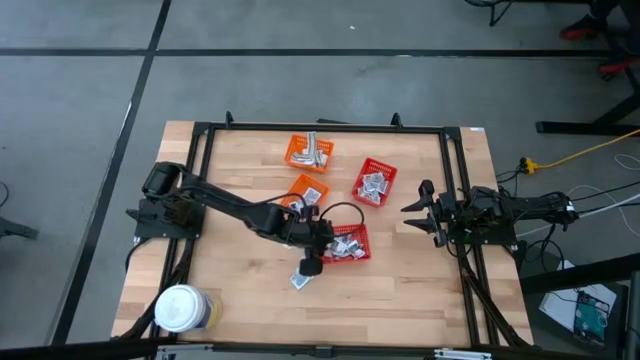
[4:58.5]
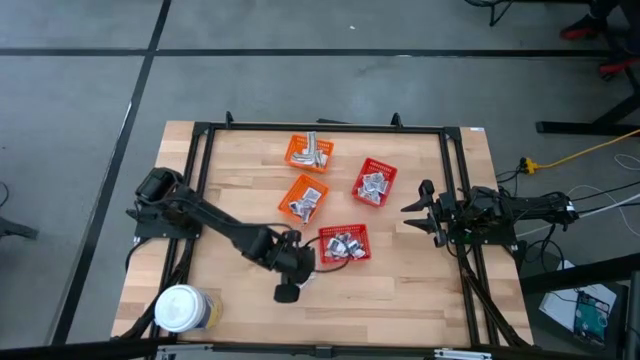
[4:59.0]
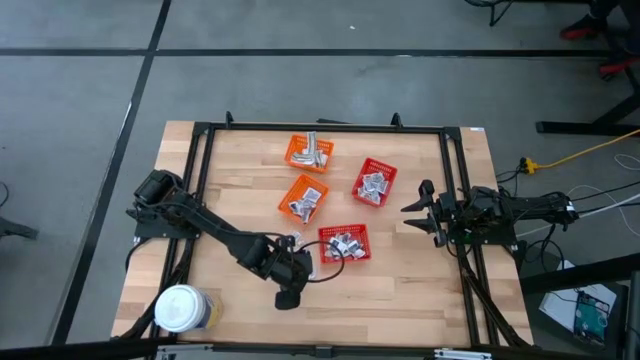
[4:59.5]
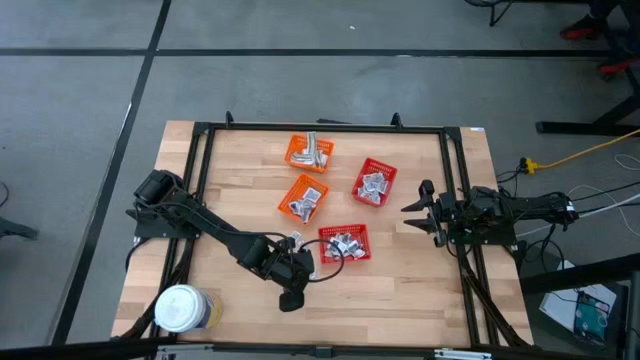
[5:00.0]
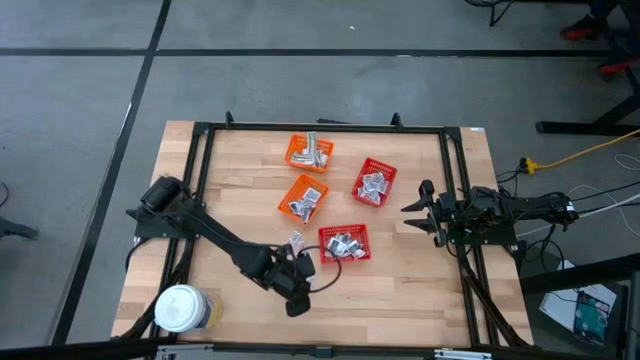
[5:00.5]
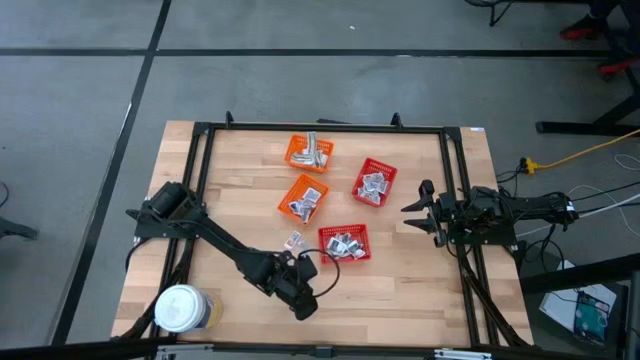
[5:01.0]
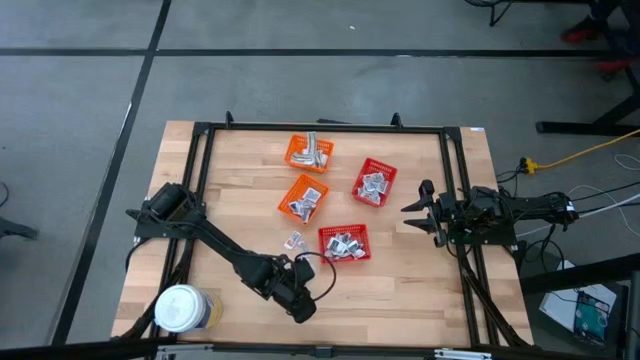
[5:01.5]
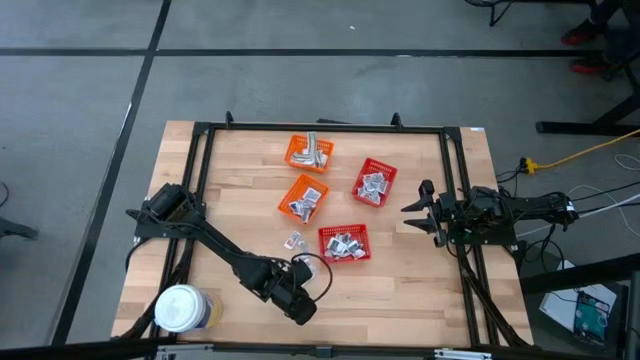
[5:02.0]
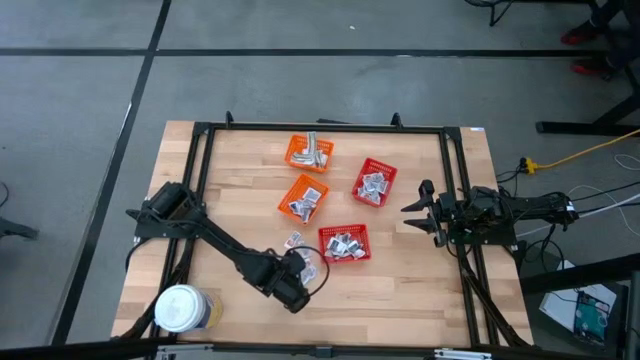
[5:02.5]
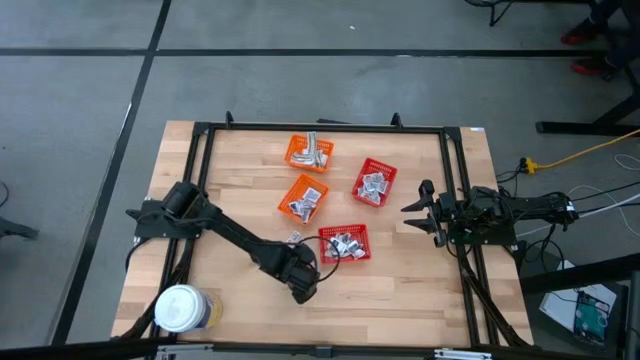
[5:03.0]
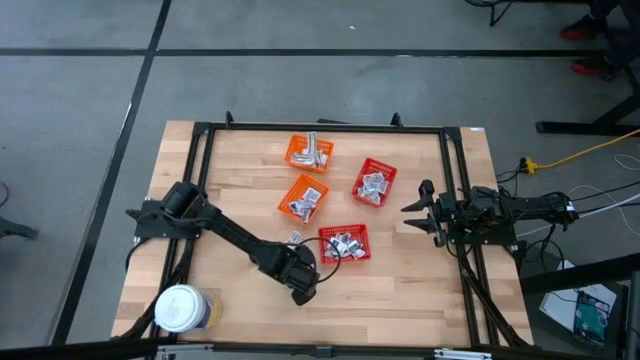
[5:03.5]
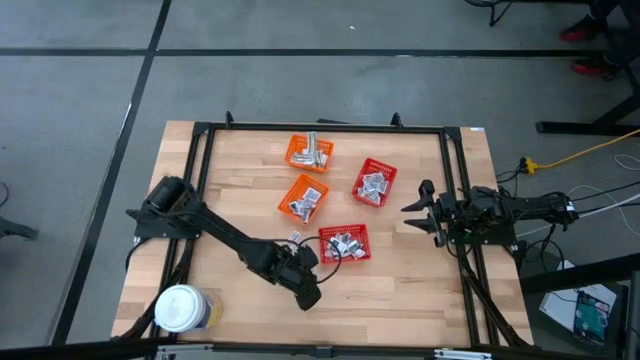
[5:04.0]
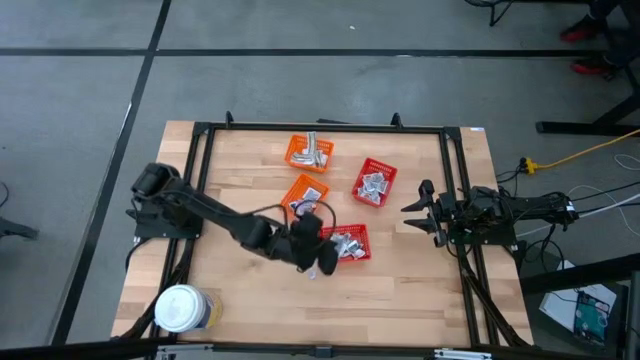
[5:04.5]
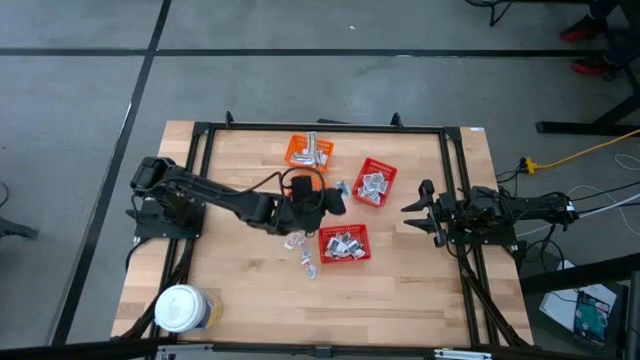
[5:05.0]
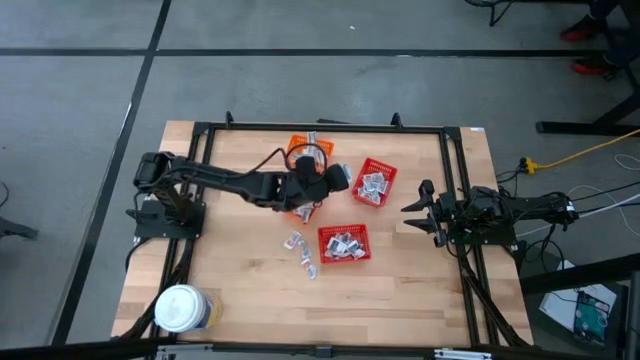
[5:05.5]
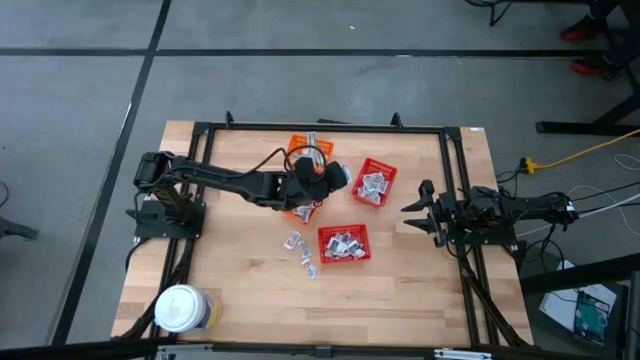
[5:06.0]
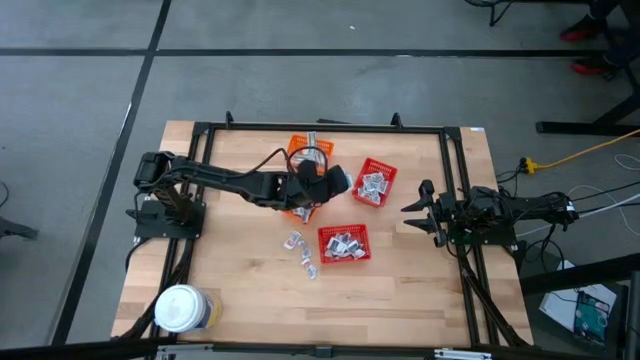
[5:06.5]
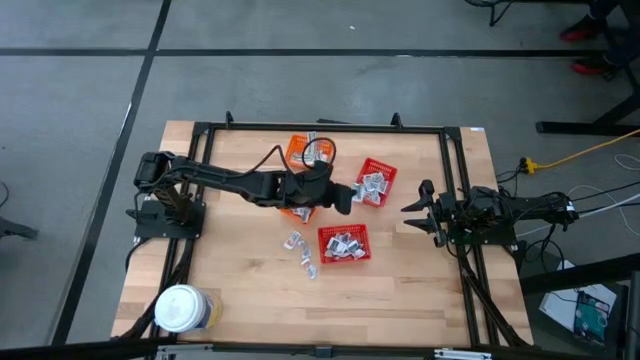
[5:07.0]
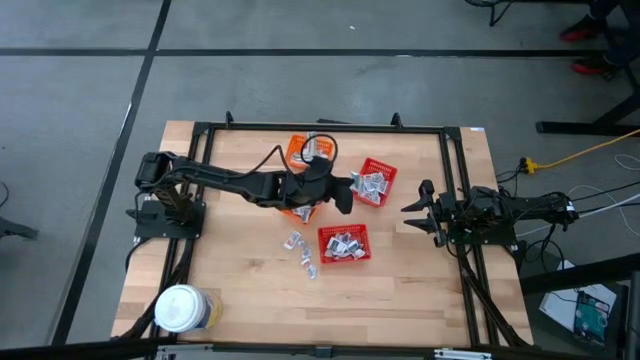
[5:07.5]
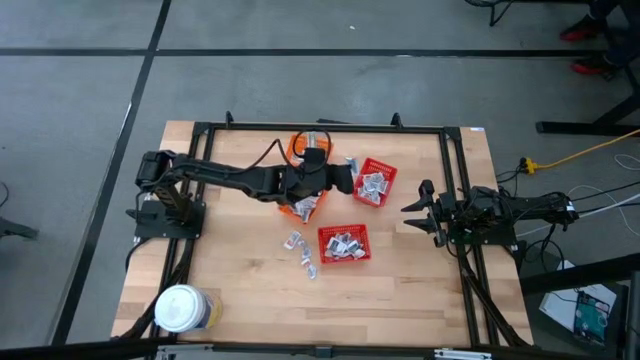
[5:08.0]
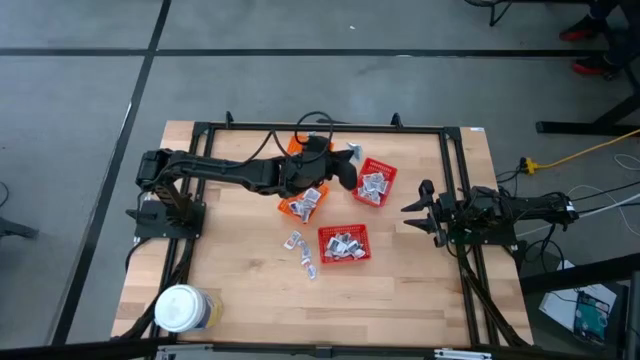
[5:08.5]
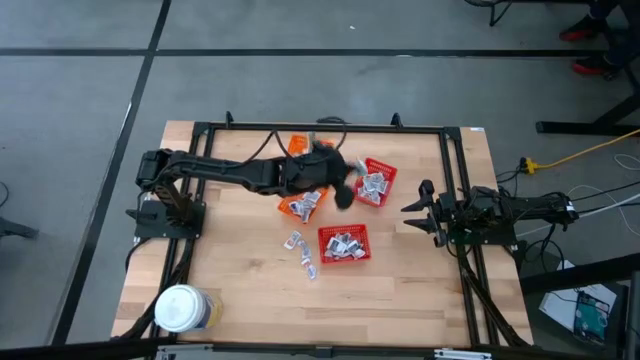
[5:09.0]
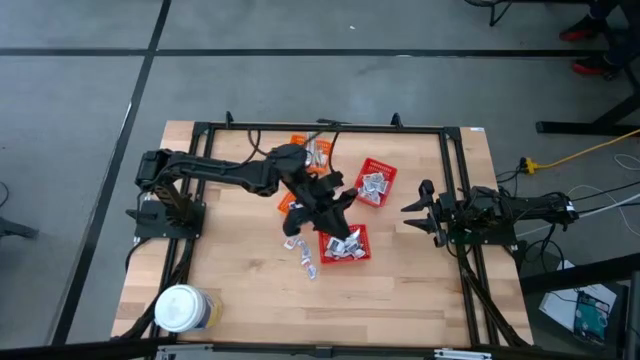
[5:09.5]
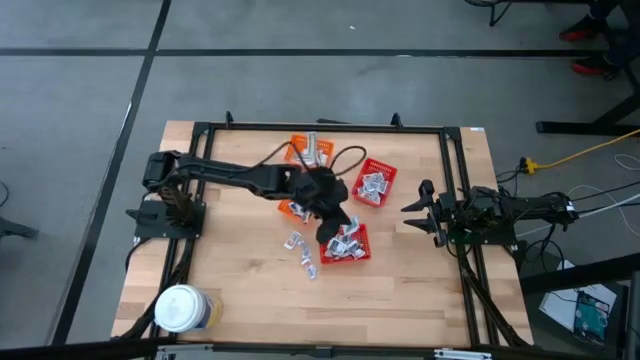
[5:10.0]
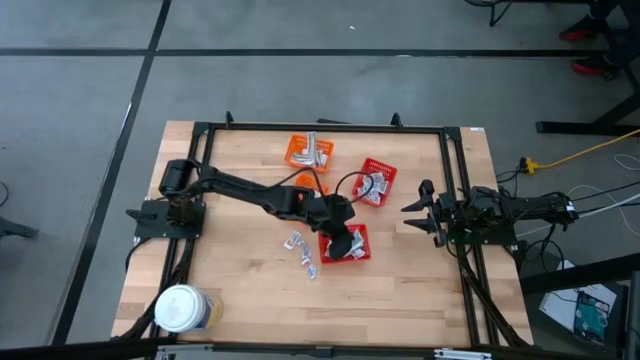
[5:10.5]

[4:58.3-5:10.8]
Task: Pick & Place First Aid Supplies
Put the gray towelette pack into the bottom red bin

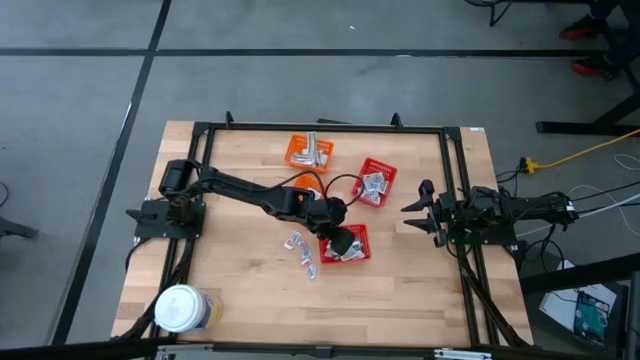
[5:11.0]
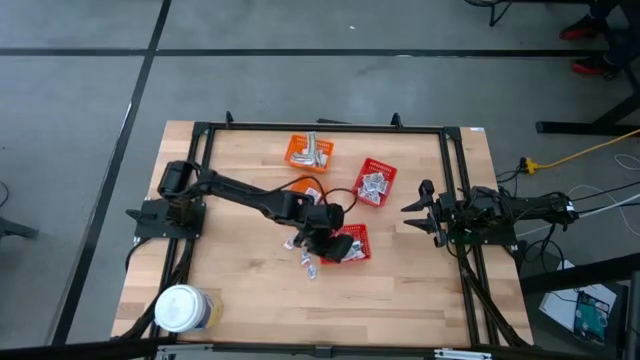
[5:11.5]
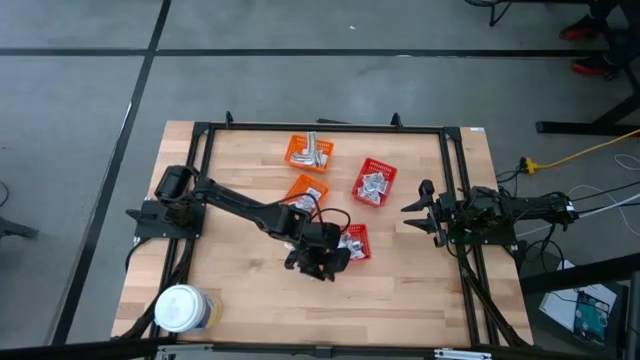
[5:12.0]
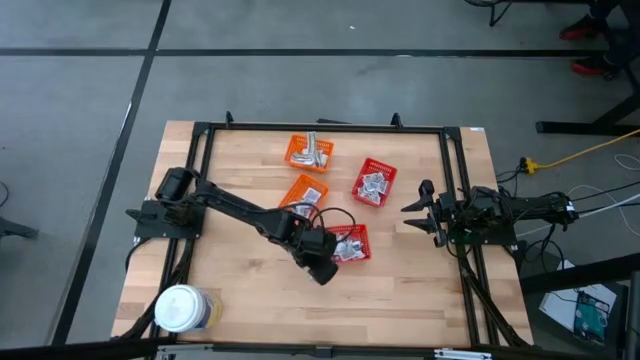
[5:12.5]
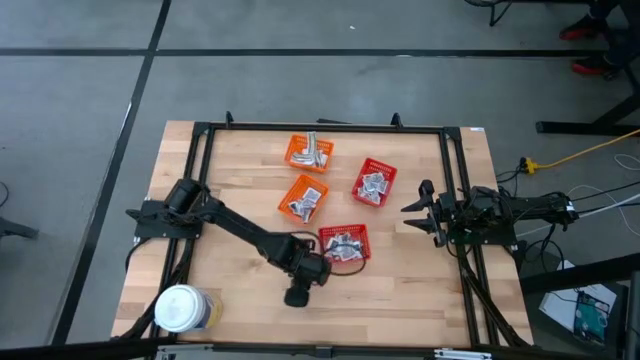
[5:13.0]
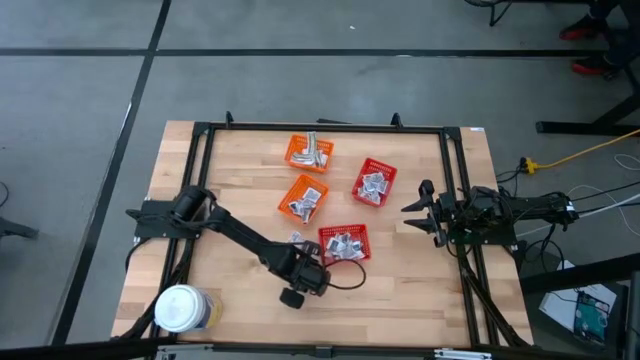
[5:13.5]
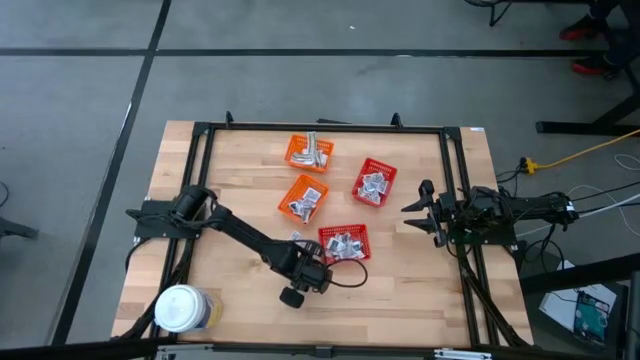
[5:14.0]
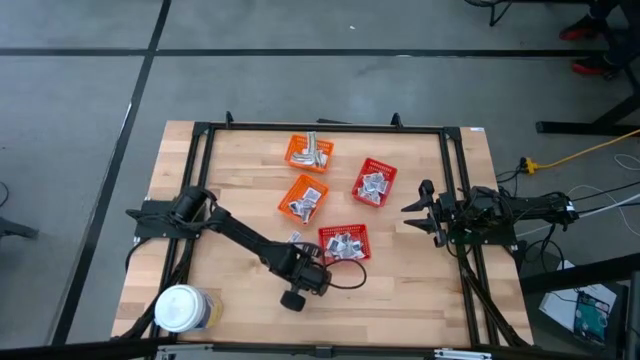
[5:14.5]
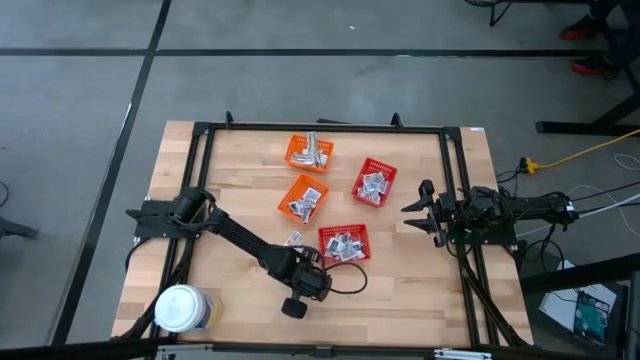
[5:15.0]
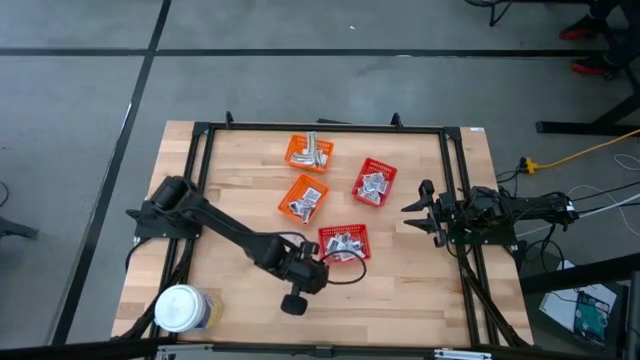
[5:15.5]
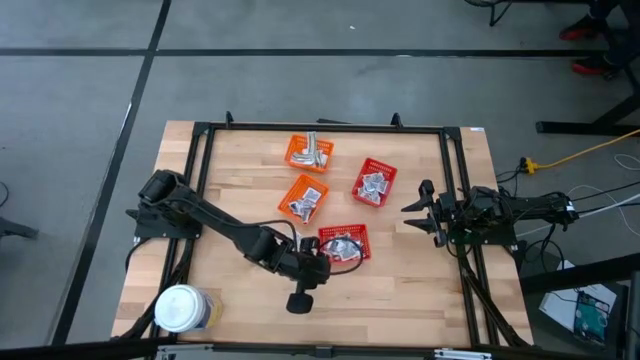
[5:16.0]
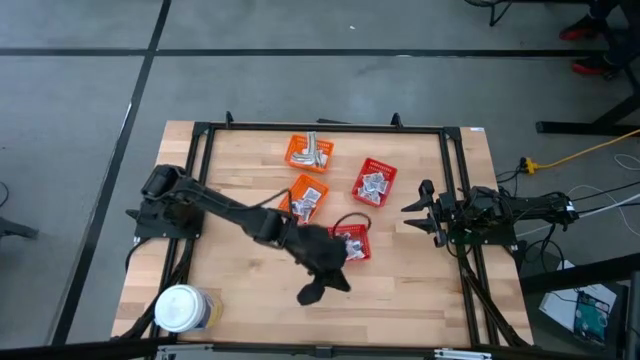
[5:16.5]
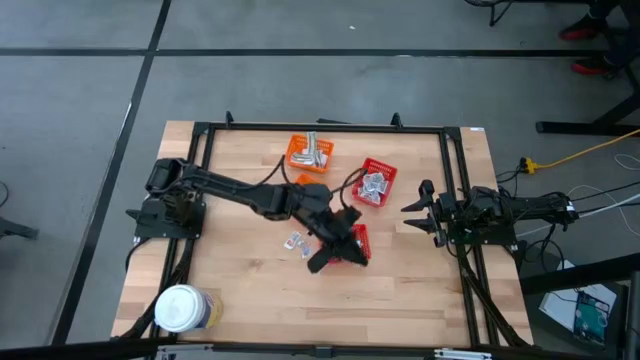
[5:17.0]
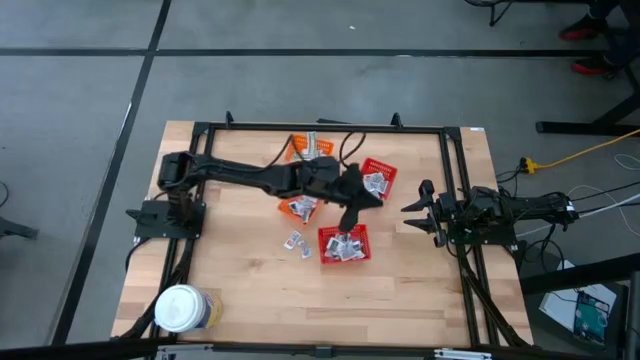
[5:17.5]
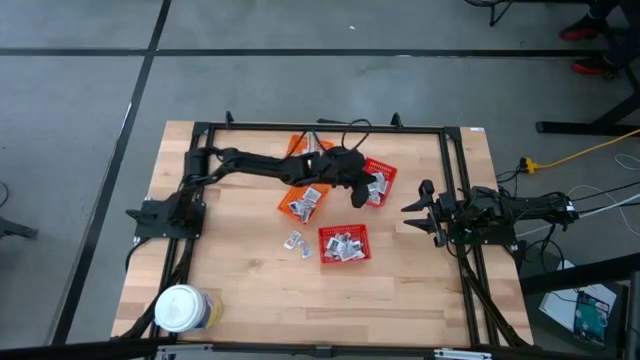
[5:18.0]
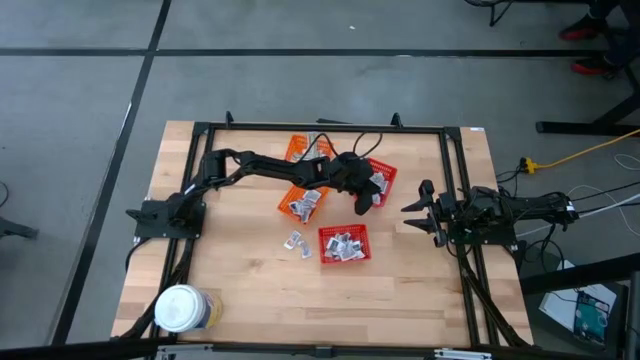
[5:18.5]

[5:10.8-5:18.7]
Put the orange ointment pack into the top red bin

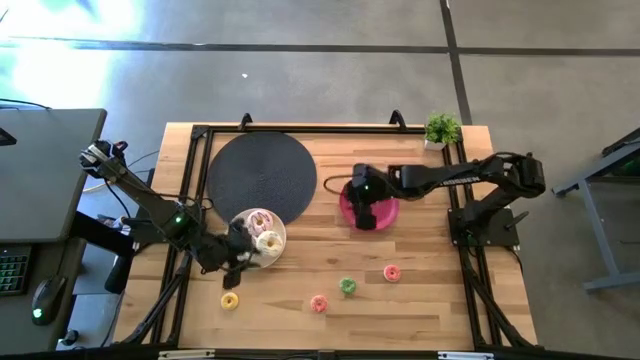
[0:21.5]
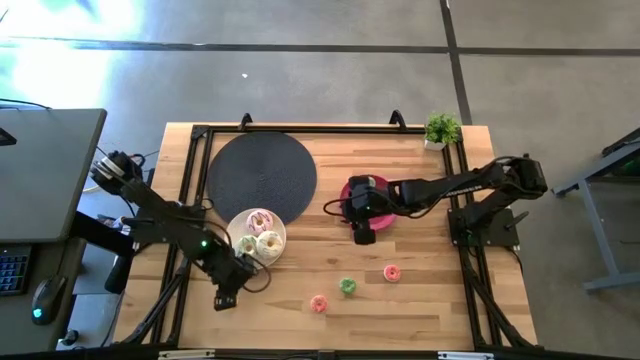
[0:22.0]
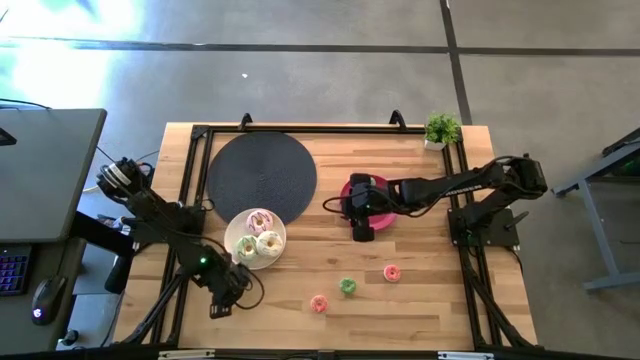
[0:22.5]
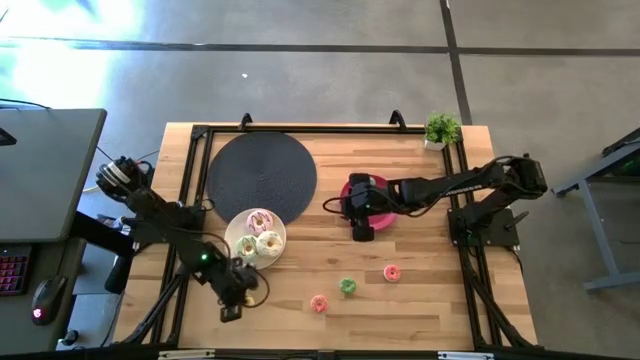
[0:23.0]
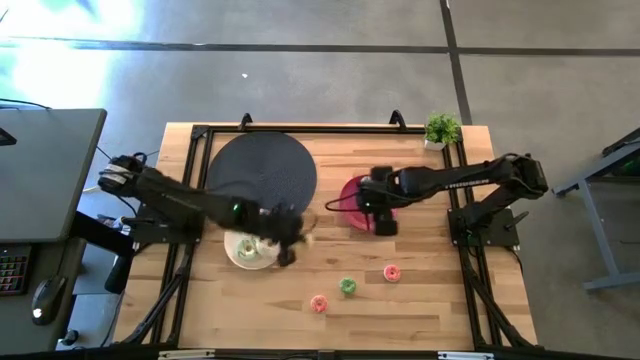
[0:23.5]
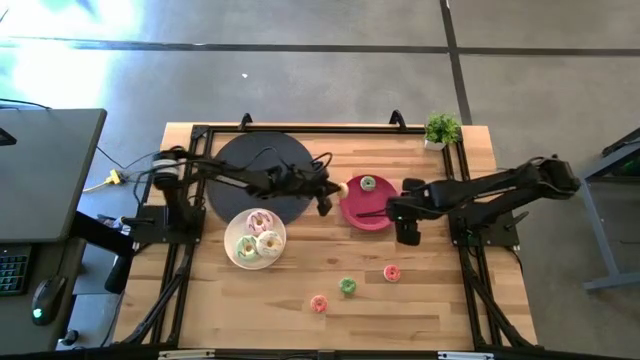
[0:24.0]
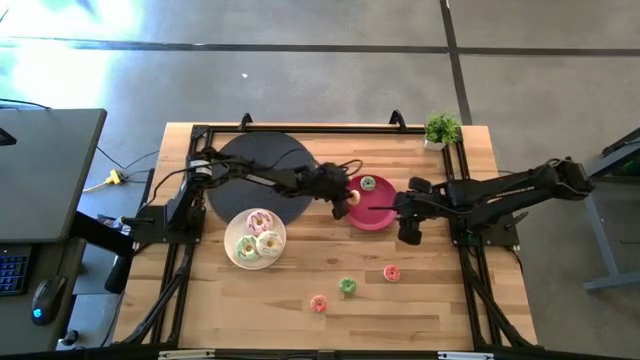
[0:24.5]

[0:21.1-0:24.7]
Task: Pick & Place donuts
Put the small yellow donut on the red plate
